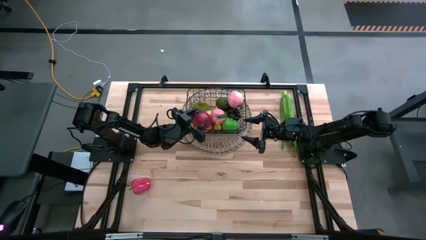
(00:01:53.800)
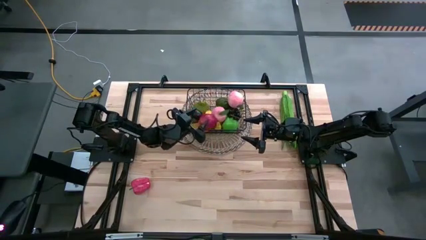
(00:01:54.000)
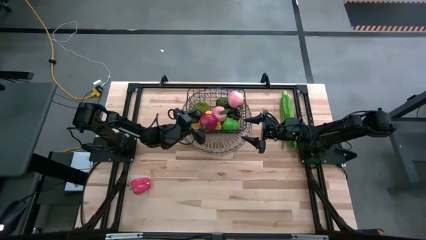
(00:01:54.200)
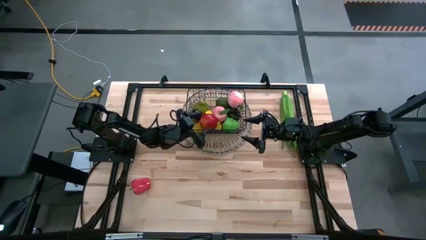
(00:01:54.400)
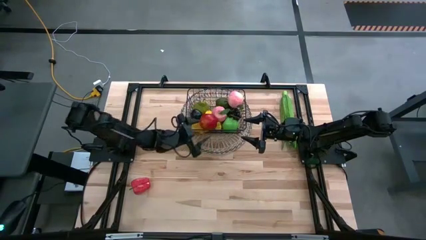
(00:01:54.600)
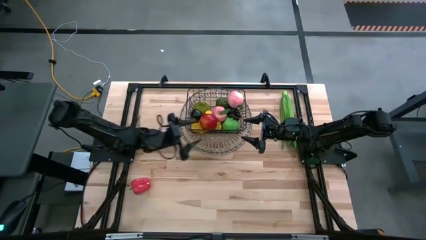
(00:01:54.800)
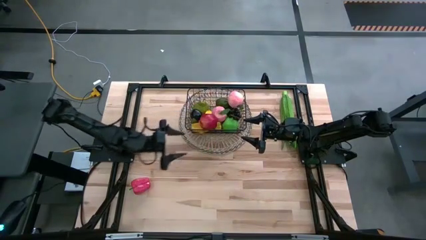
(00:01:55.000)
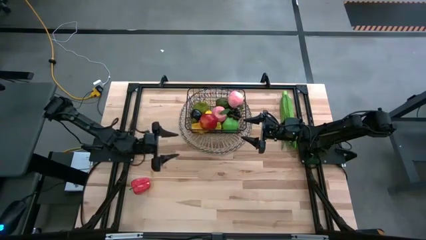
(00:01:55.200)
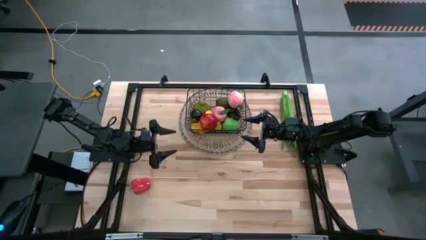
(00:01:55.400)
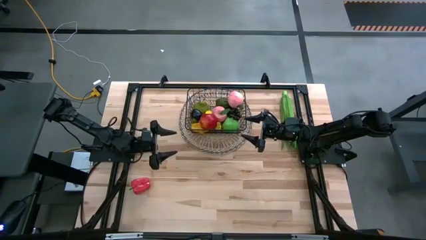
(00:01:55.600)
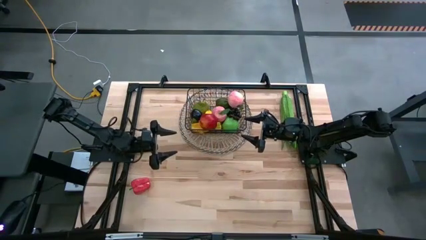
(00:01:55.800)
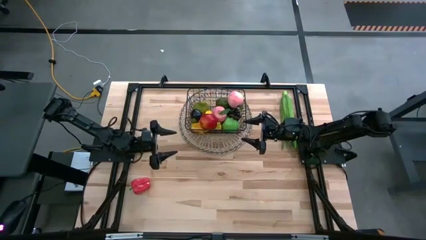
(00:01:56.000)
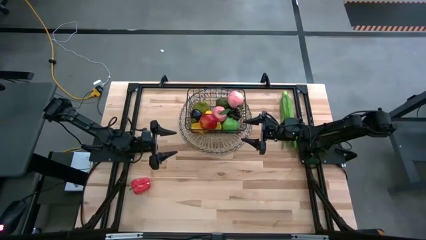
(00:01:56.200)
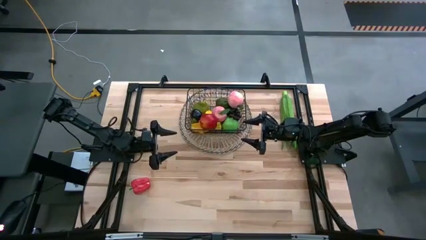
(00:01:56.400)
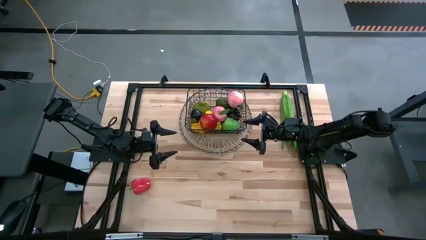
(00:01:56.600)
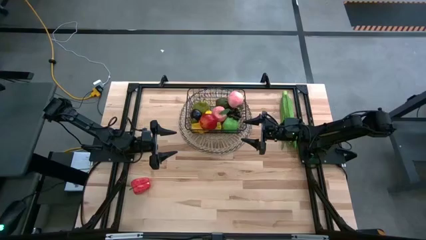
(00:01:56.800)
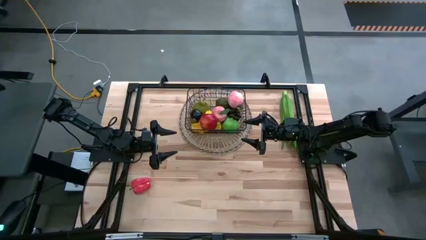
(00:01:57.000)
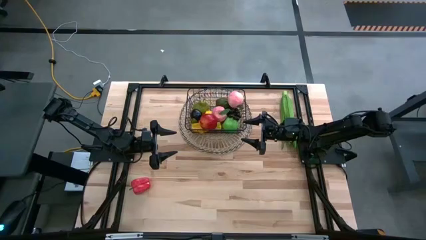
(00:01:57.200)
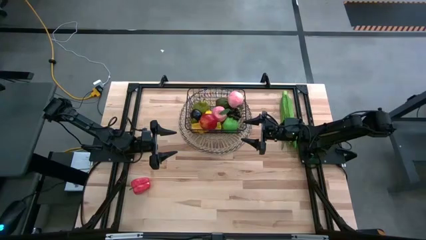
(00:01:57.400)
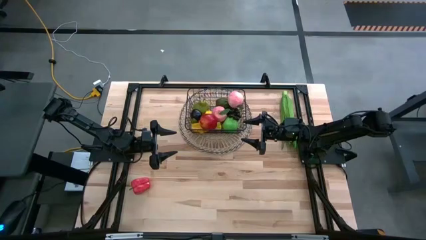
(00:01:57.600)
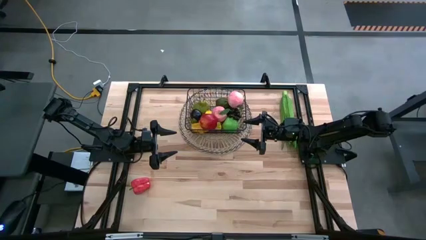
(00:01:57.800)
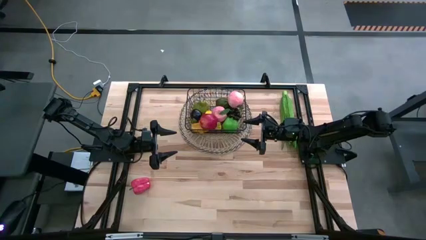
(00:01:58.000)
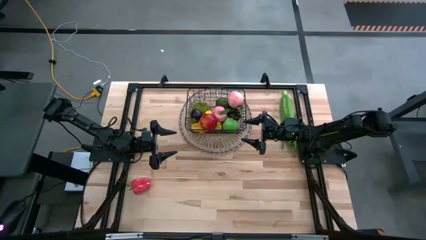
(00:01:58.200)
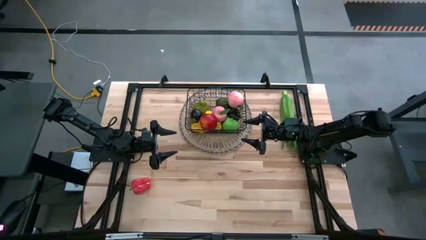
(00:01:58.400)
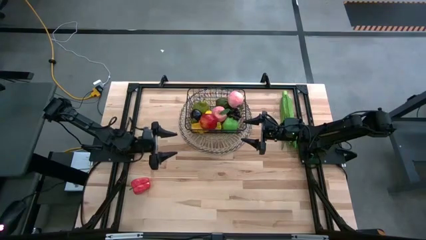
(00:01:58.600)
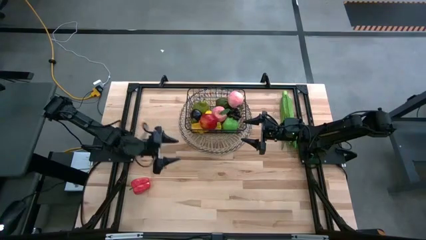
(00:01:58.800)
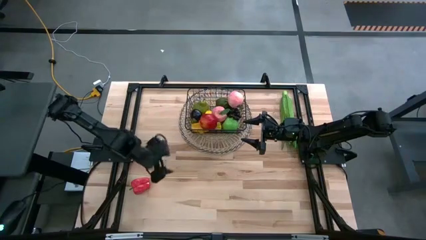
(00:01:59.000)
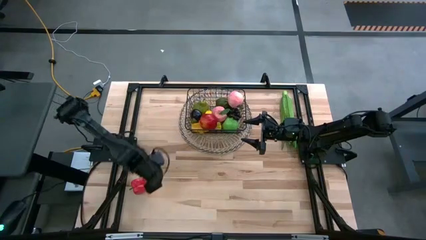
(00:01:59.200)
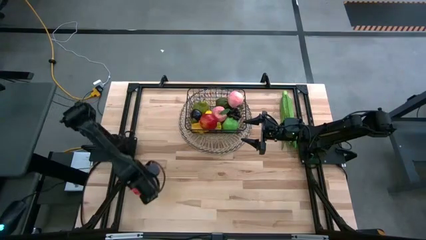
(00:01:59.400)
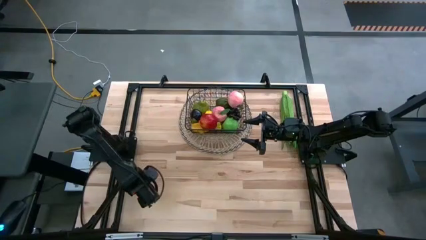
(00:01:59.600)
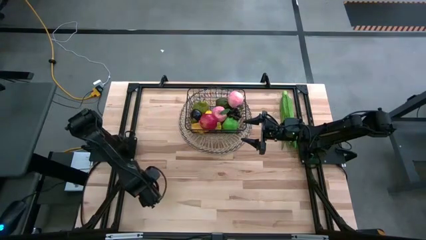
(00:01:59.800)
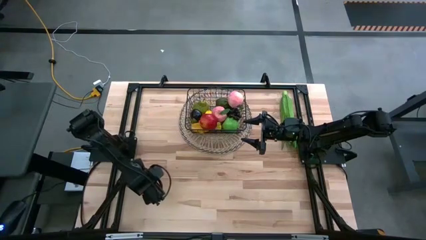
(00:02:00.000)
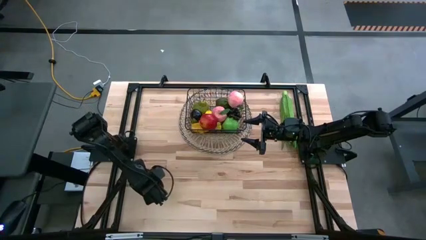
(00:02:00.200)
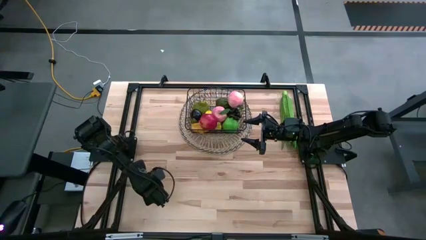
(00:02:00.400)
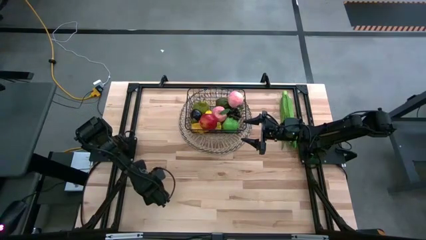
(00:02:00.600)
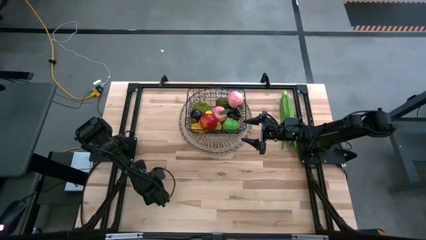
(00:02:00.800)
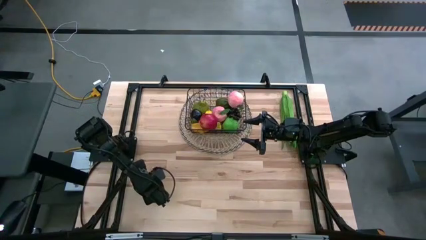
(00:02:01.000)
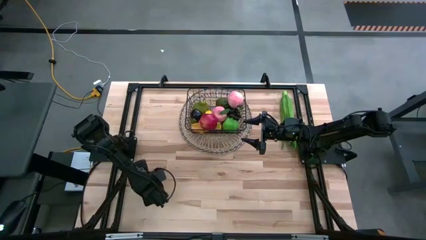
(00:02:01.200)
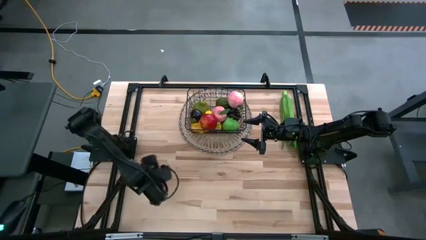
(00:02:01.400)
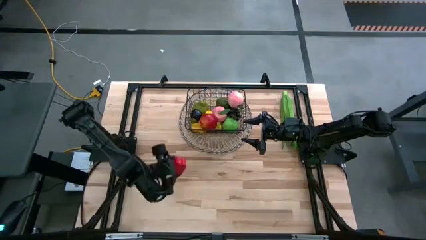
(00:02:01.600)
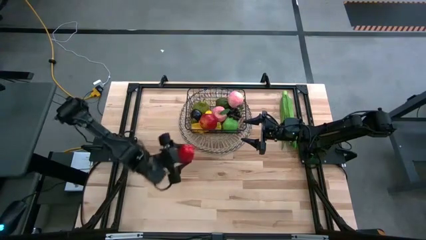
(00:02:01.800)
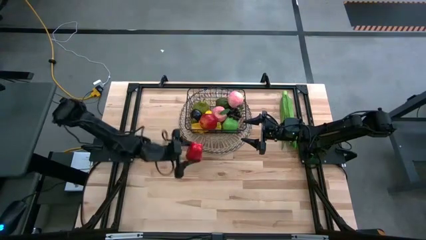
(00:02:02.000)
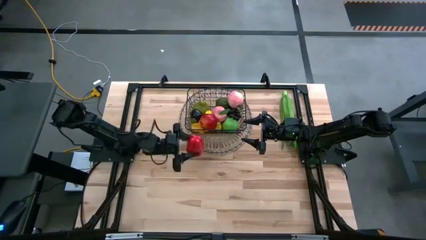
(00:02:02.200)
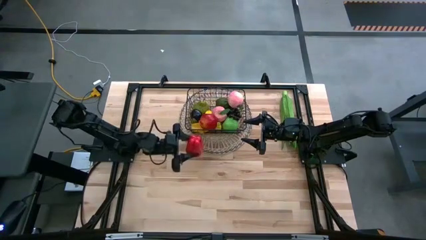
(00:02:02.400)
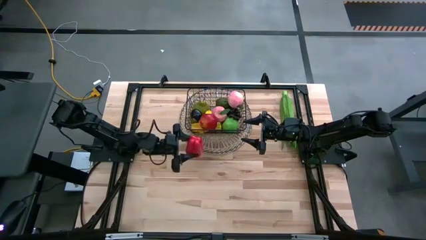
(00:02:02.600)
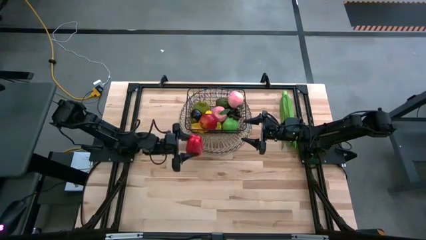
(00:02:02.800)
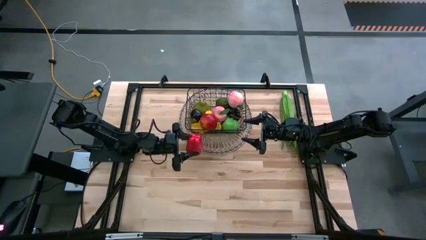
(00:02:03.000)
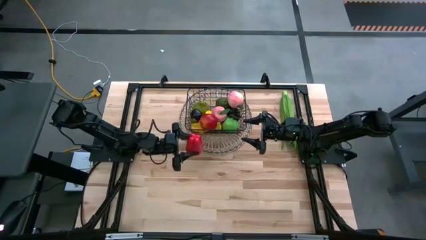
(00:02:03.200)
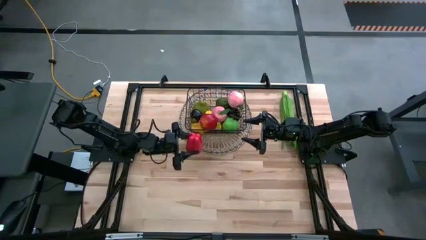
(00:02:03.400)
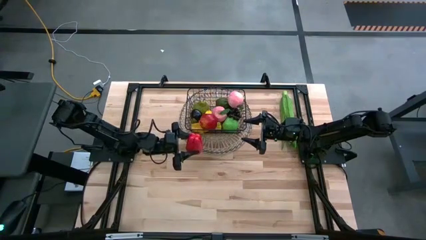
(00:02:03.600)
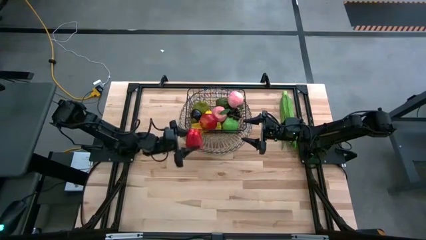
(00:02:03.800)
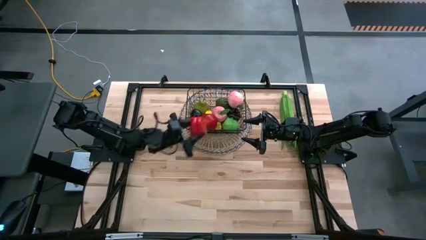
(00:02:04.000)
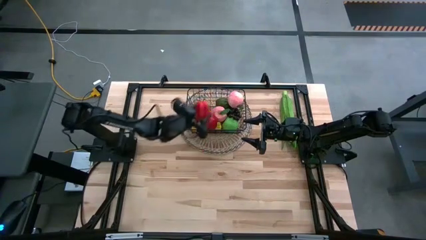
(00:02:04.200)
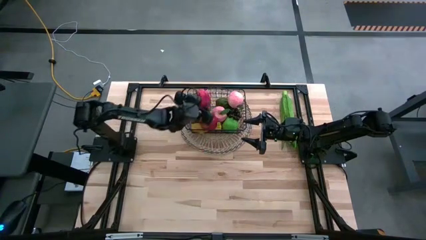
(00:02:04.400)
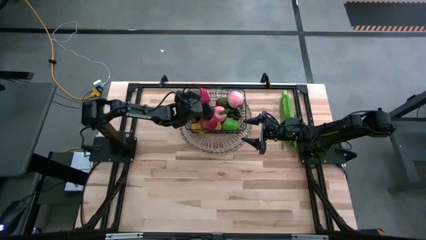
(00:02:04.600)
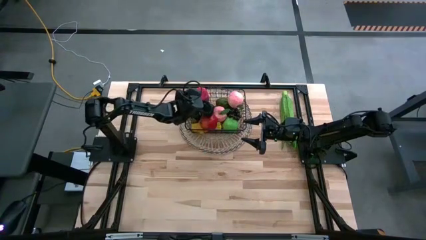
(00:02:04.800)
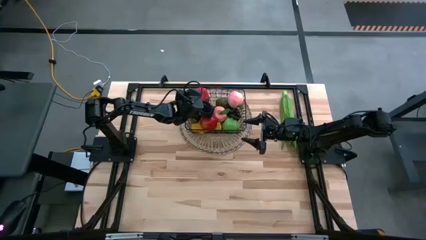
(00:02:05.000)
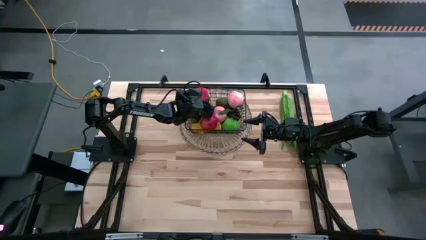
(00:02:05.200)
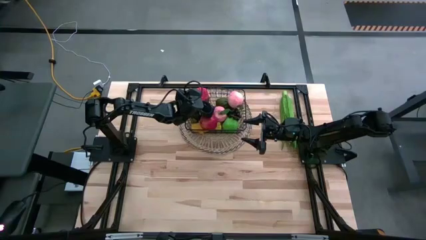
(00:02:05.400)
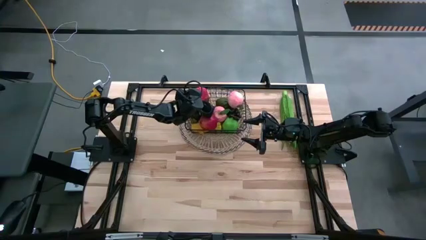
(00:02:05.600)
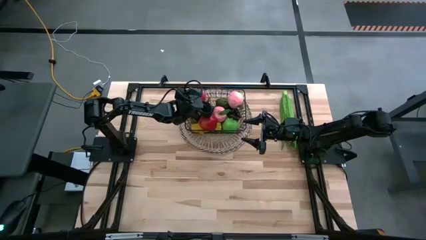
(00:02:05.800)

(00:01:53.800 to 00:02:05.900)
Task: Build produce basket
Put the red bell pepper into the black wire basket
